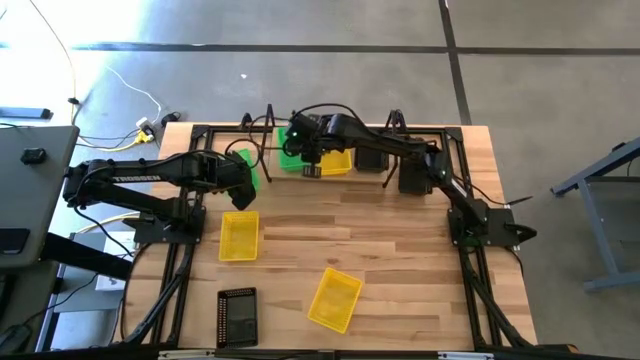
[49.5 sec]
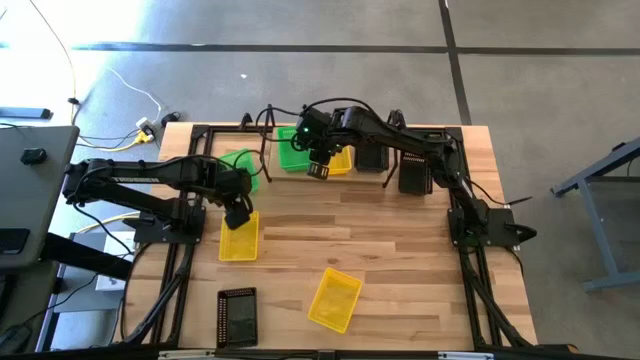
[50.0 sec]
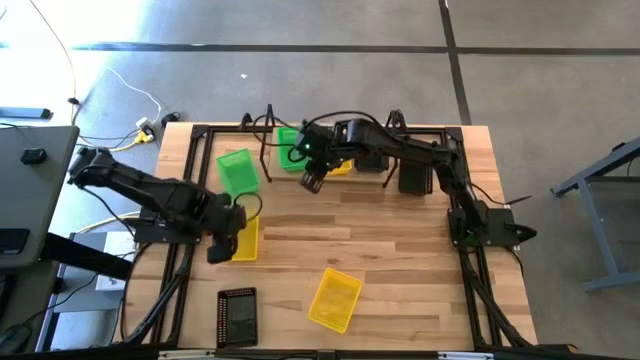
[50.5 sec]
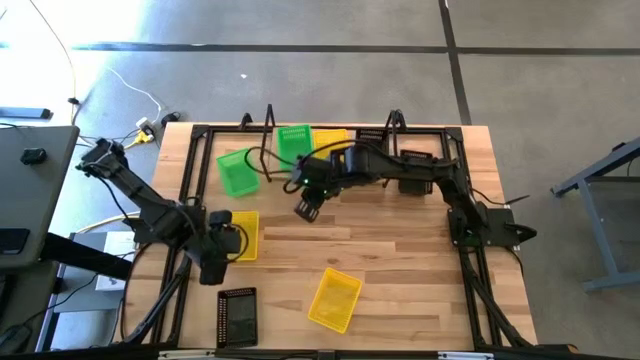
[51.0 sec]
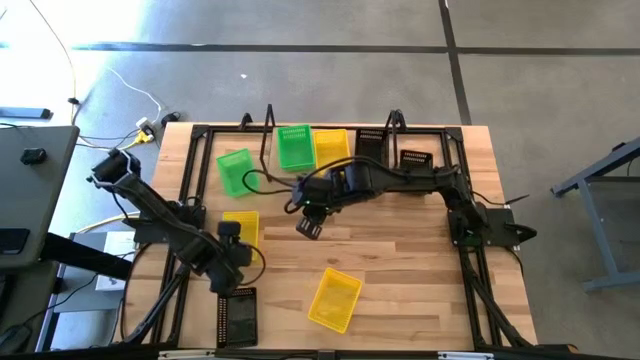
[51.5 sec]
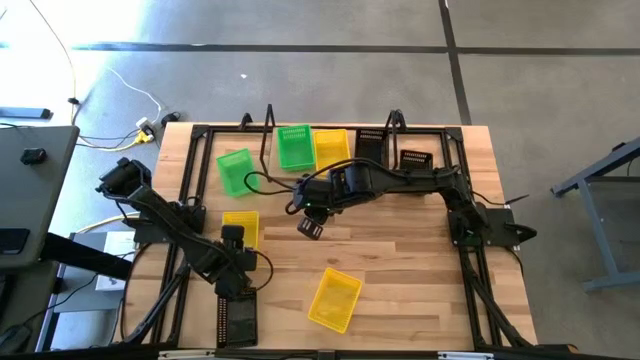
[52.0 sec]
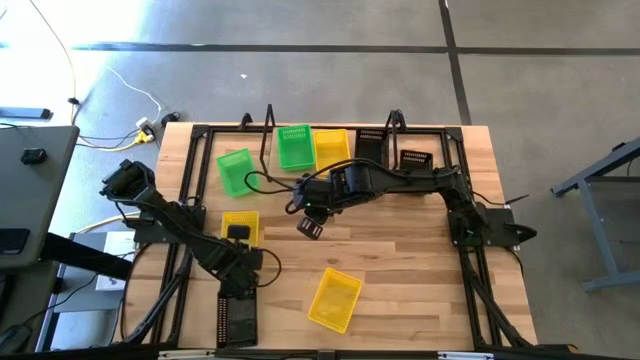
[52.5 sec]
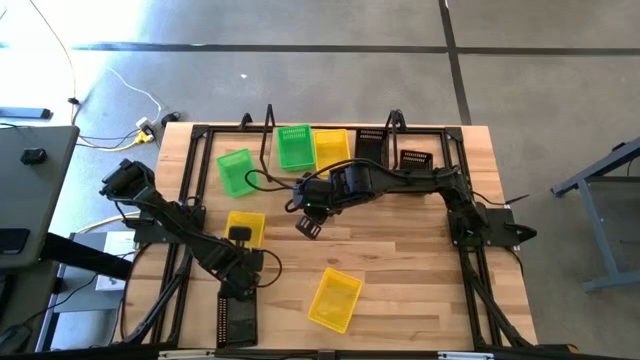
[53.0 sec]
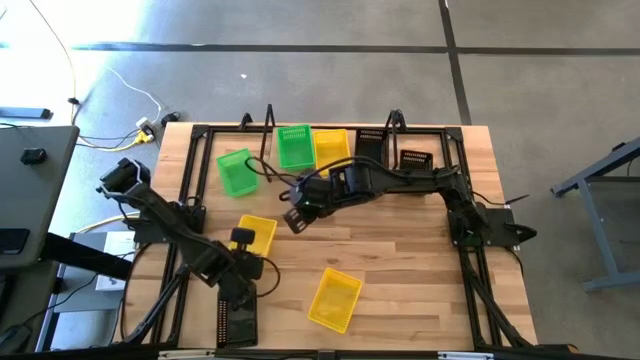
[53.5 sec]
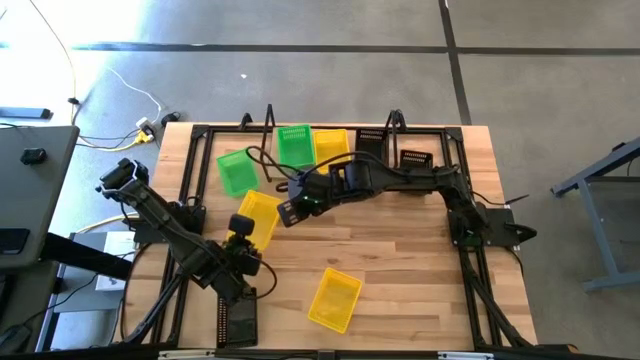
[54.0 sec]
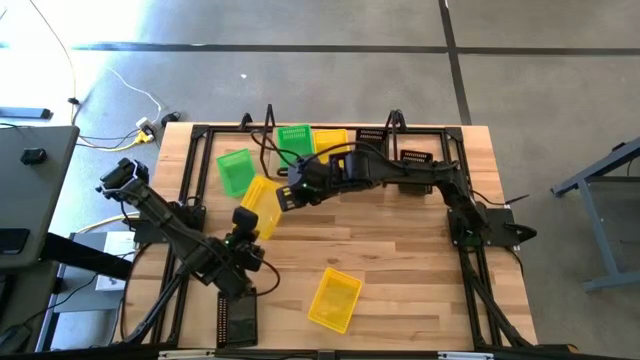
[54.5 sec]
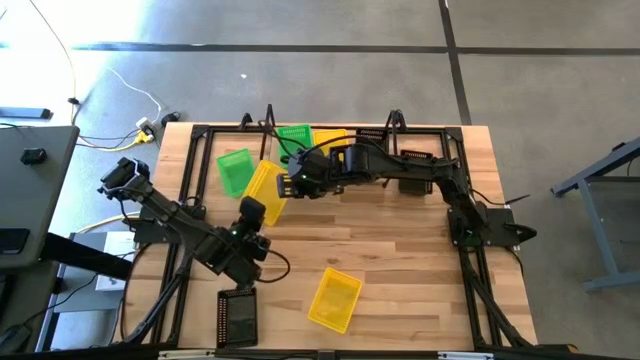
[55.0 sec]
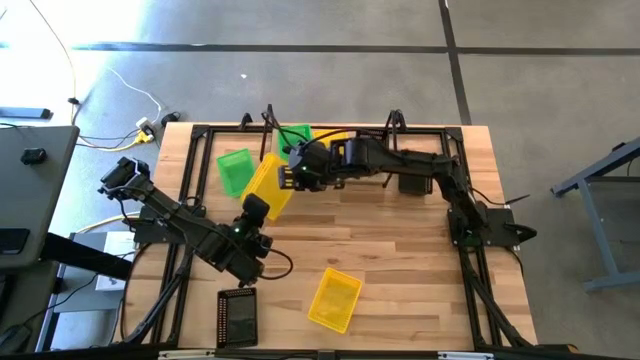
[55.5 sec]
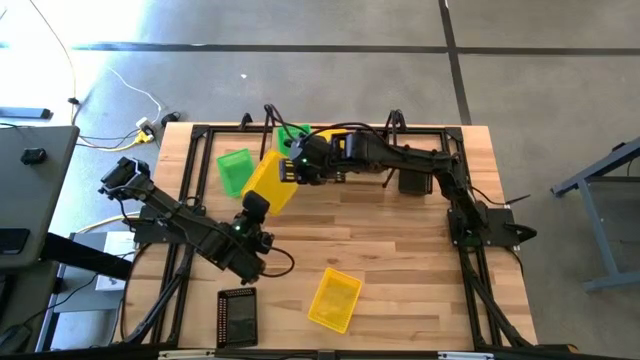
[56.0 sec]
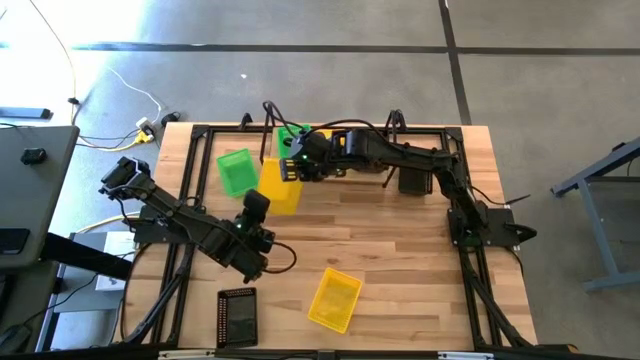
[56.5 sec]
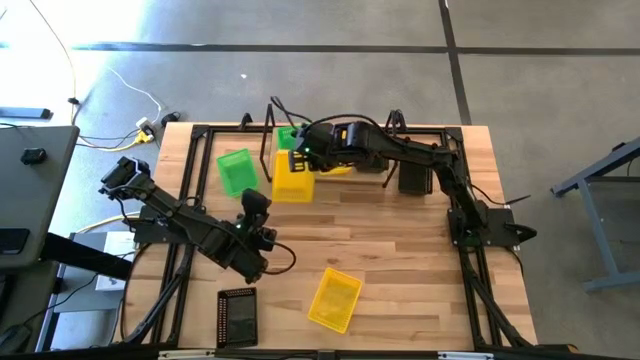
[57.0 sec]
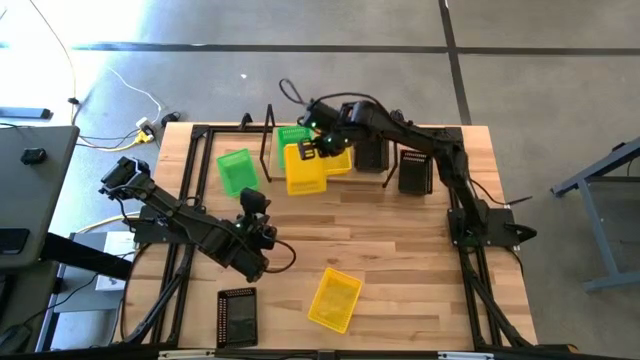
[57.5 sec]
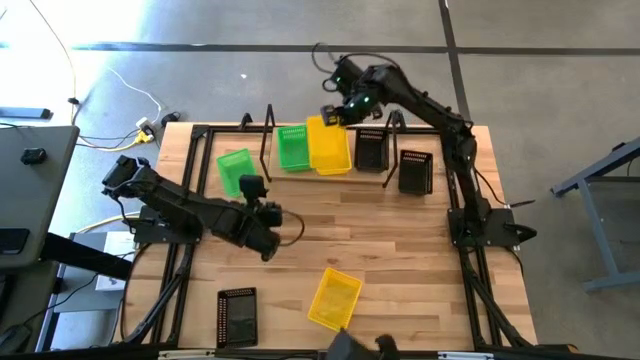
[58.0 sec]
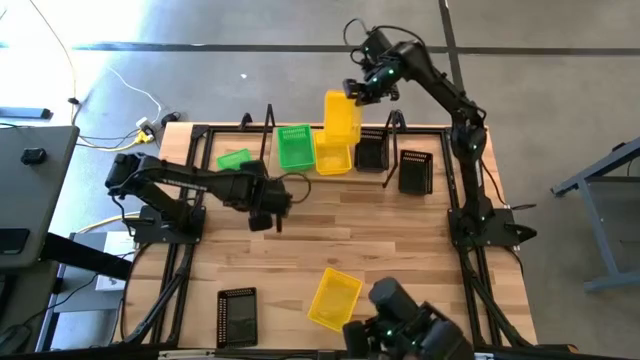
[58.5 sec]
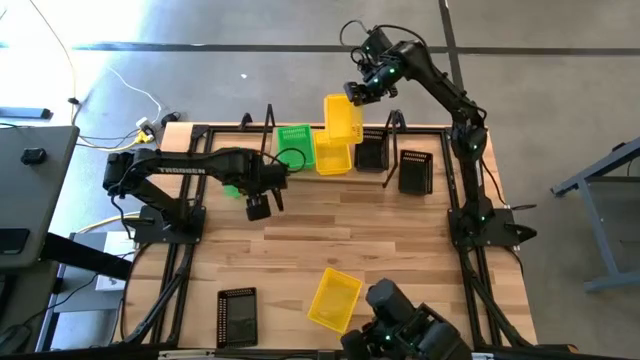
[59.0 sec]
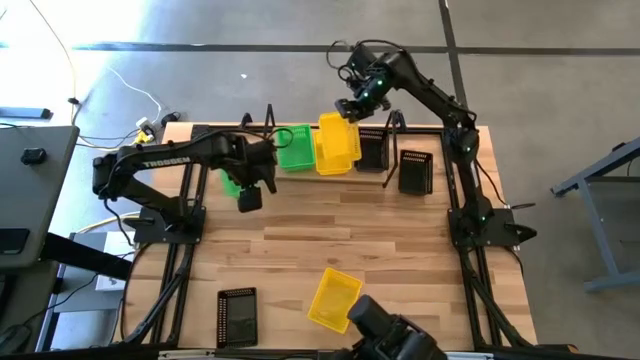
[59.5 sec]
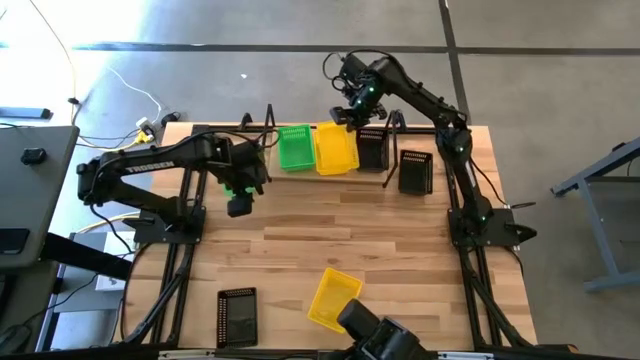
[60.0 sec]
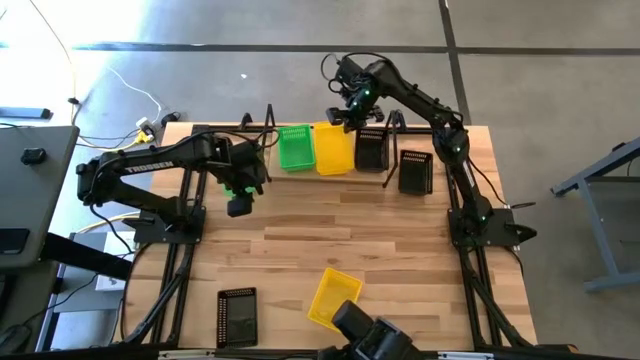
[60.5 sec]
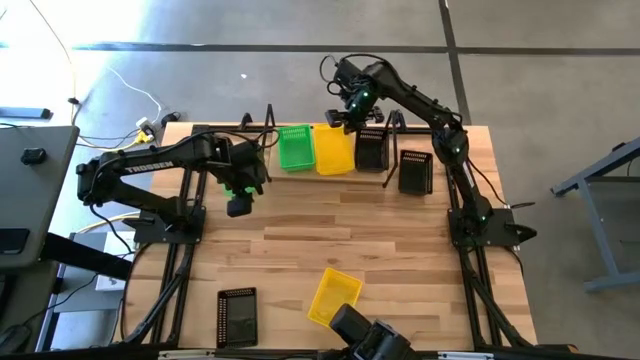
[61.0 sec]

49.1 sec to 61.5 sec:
Task: Stack baskets on shelf by color
Stack the left yellow bin on top of the yellow bin on the shelf

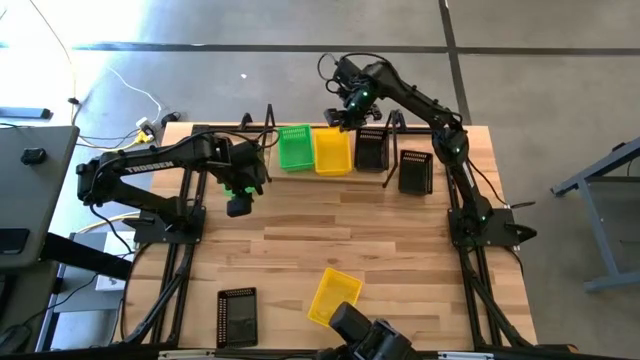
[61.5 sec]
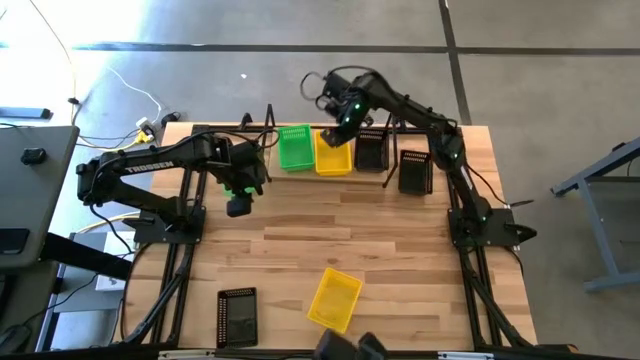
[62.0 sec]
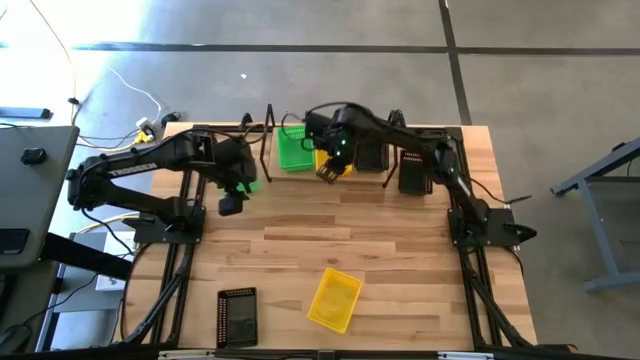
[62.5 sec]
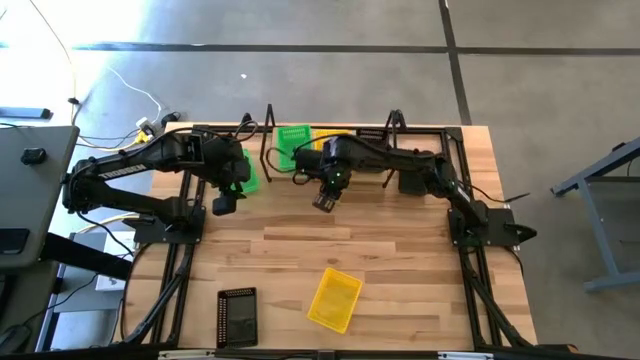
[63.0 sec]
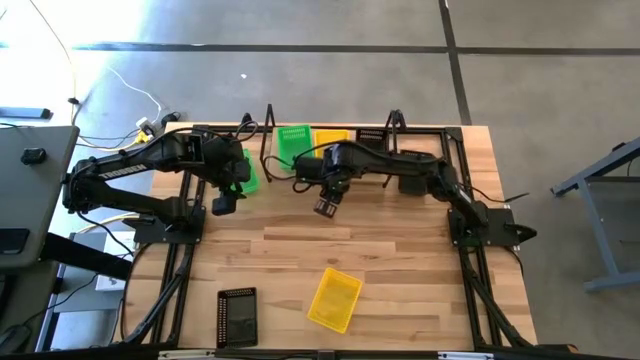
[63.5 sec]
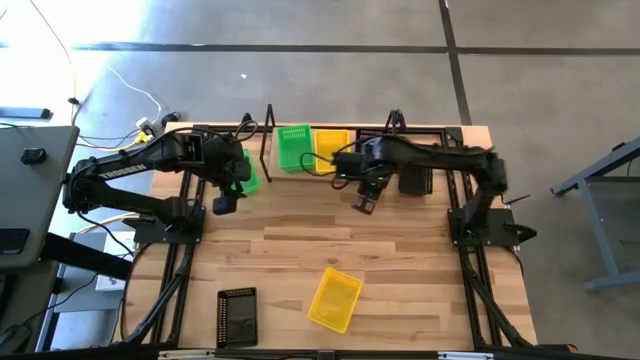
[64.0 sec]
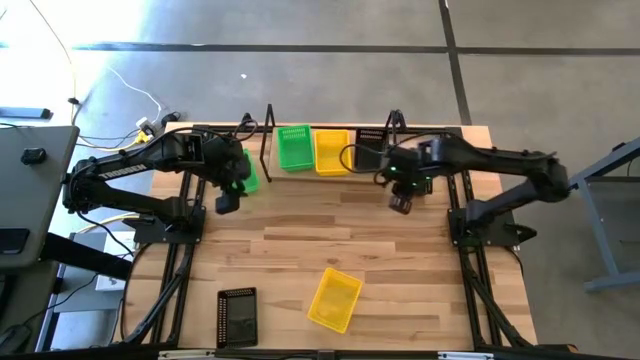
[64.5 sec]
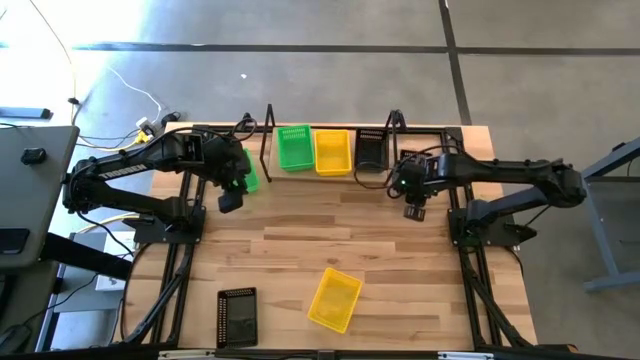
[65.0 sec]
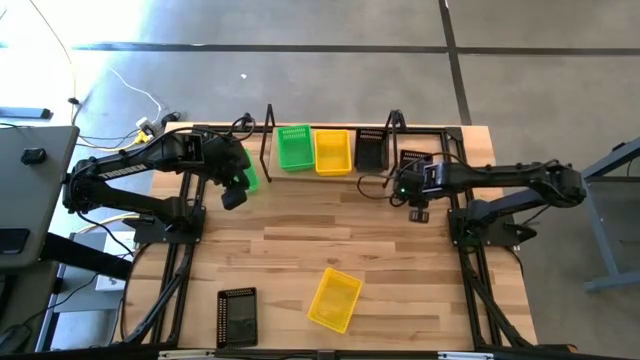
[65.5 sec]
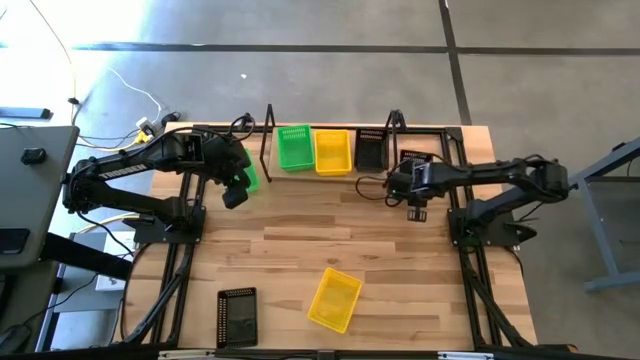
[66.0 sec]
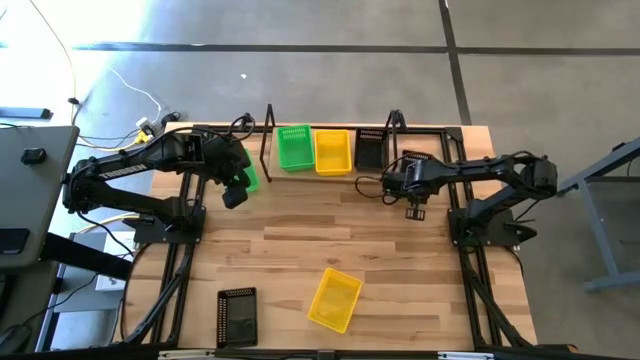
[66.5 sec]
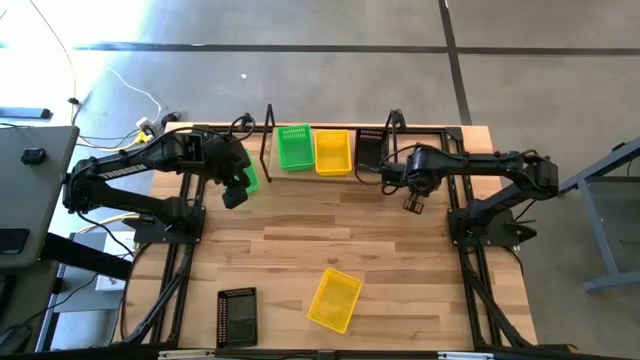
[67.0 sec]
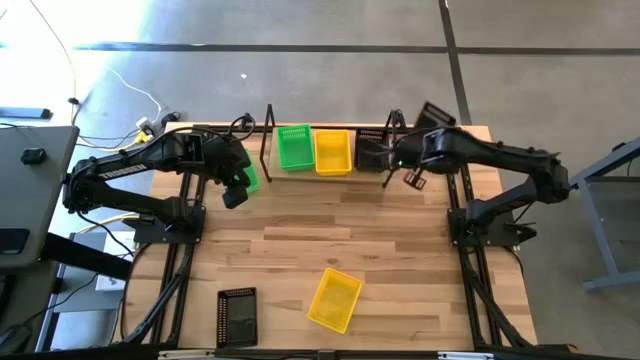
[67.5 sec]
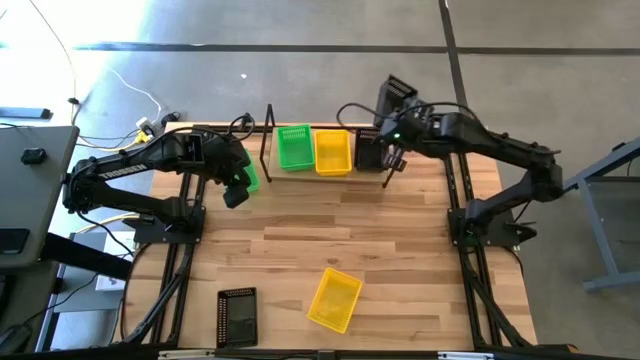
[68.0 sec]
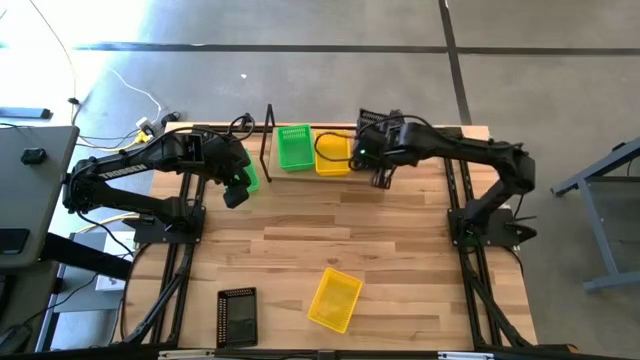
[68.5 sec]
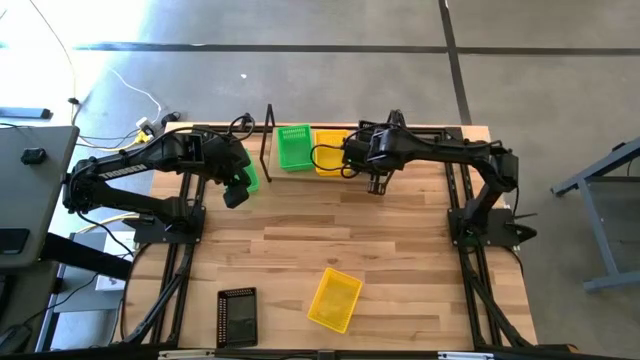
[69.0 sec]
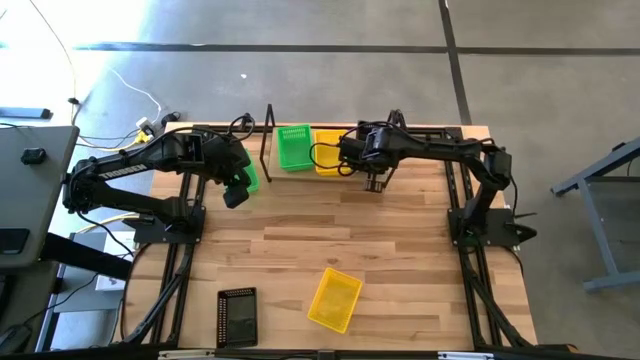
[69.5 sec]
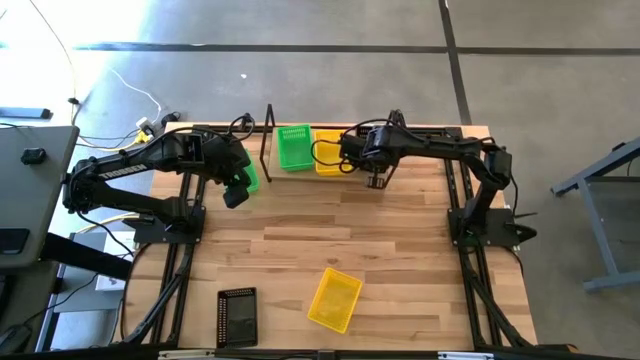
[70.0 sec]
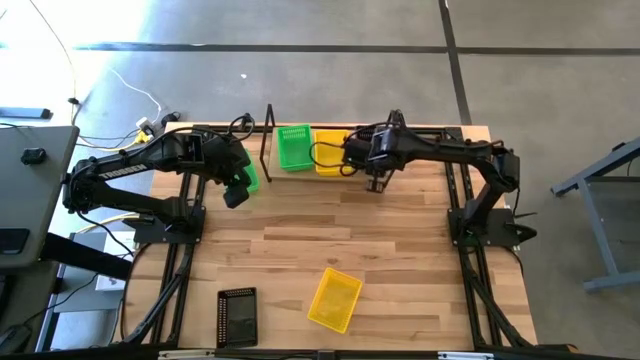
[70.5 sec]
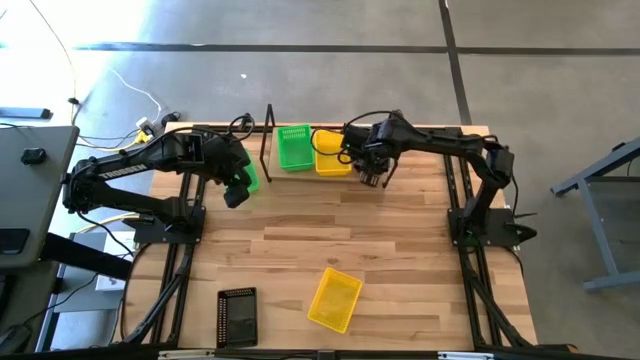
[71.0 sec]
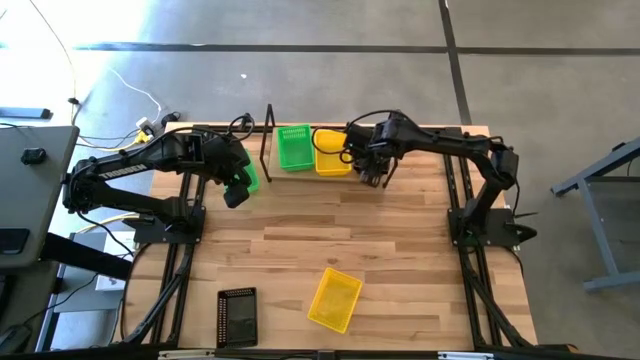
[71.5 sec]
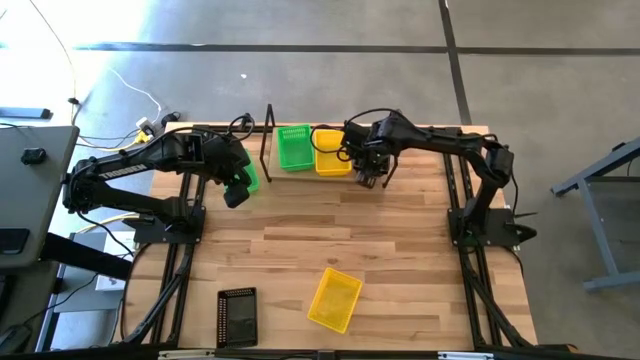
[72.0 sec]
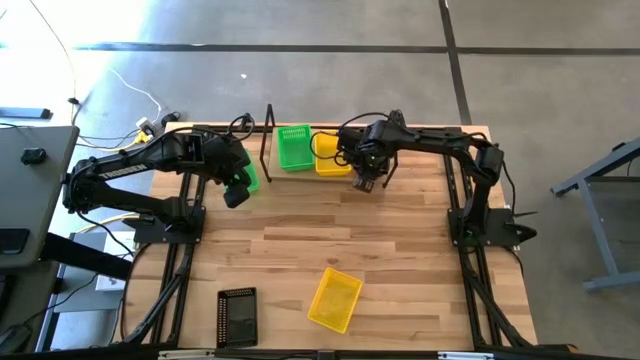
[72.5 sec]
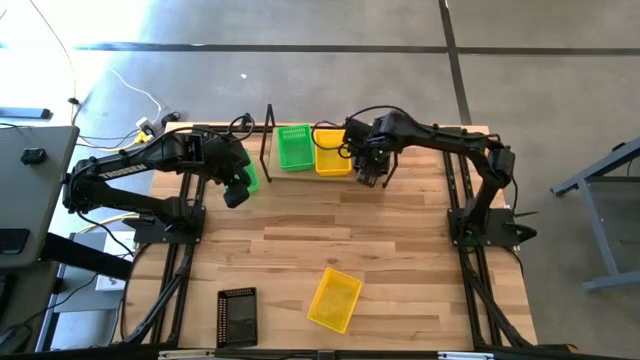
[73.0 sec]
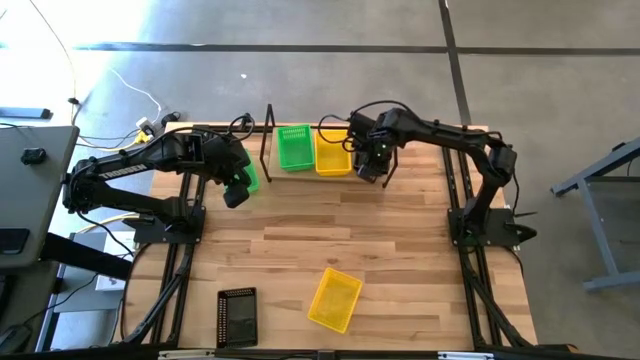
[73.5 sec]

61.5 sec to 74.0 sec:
Stack the top black bin on top of the black bin on the shelf
